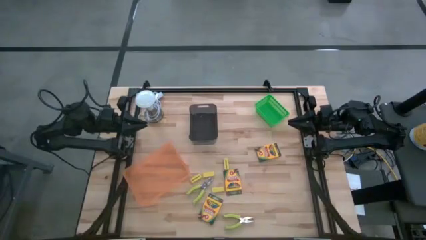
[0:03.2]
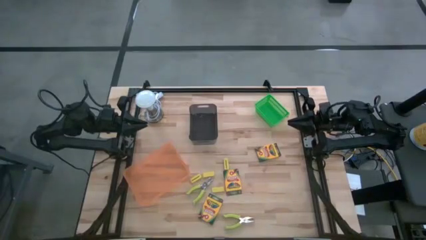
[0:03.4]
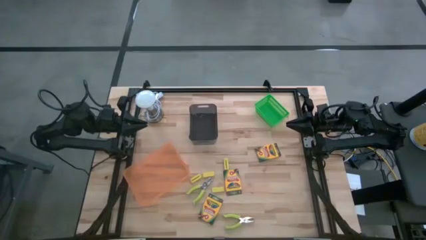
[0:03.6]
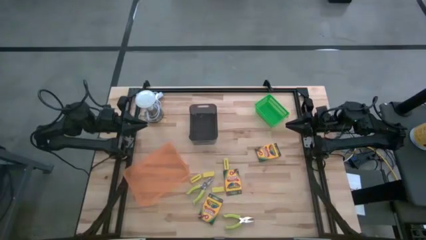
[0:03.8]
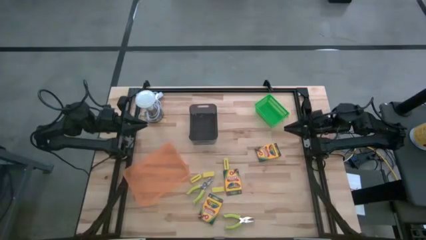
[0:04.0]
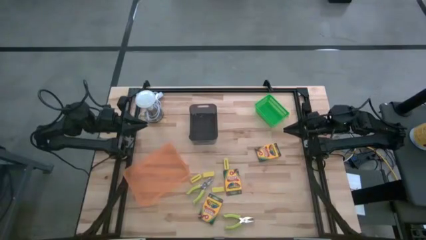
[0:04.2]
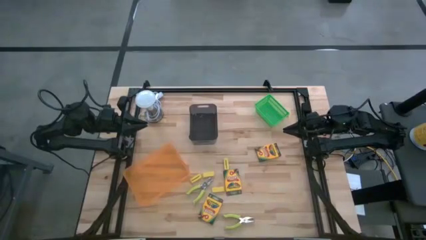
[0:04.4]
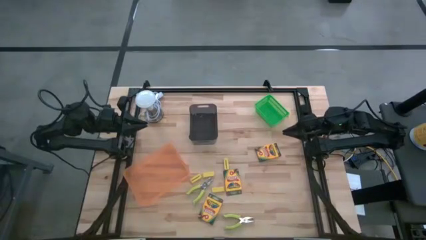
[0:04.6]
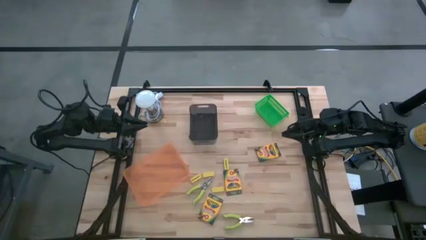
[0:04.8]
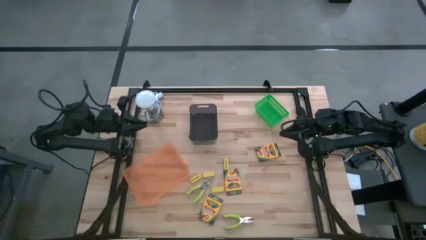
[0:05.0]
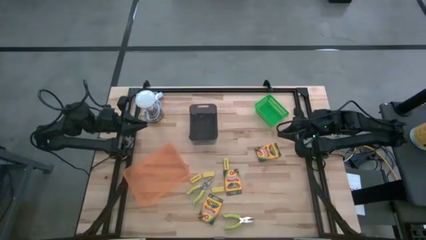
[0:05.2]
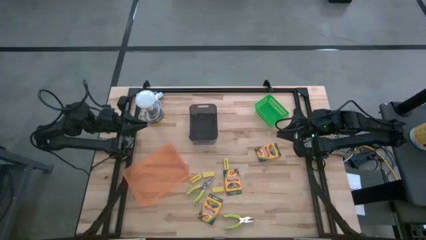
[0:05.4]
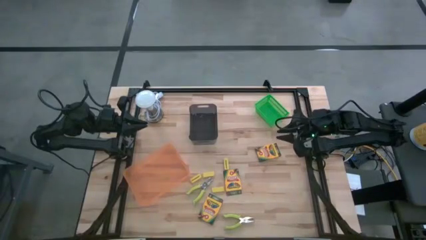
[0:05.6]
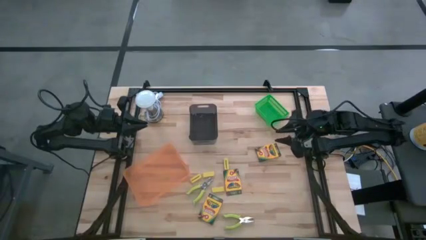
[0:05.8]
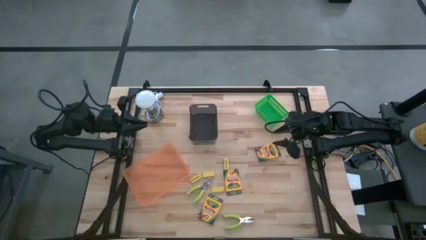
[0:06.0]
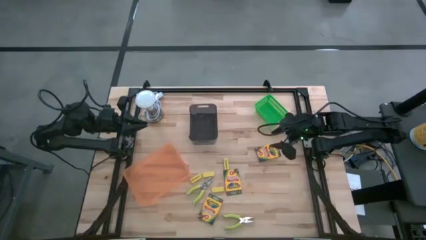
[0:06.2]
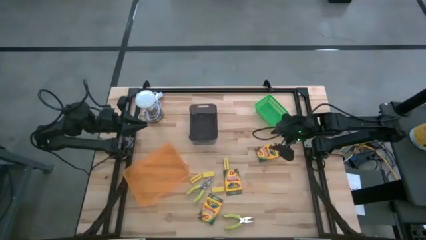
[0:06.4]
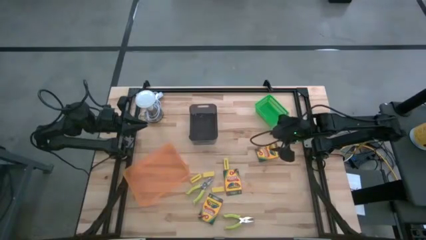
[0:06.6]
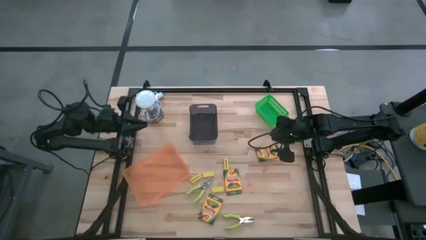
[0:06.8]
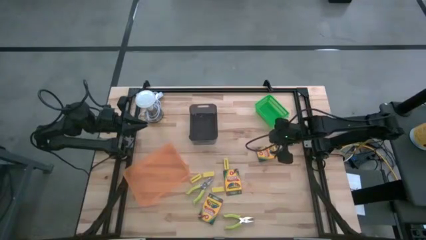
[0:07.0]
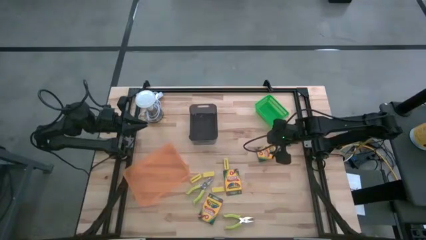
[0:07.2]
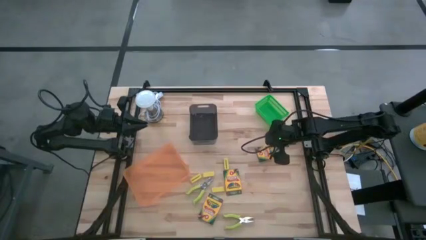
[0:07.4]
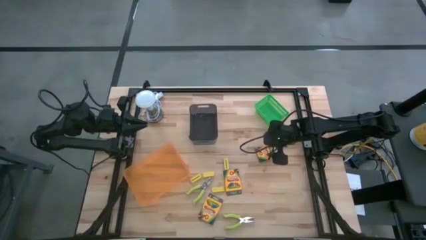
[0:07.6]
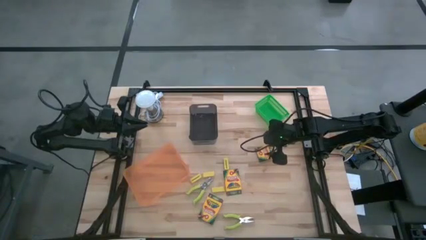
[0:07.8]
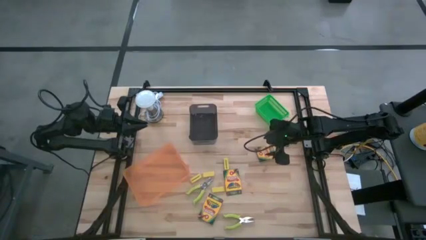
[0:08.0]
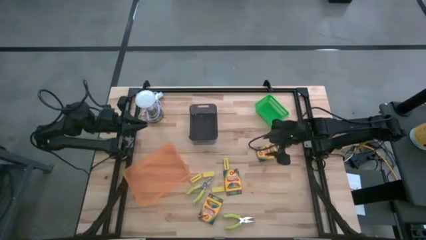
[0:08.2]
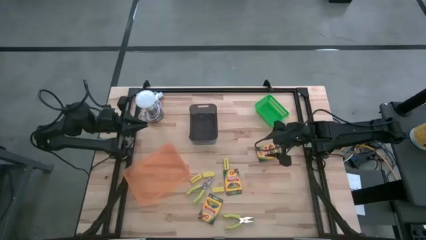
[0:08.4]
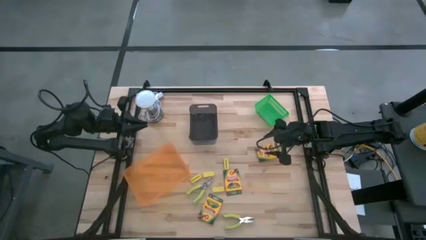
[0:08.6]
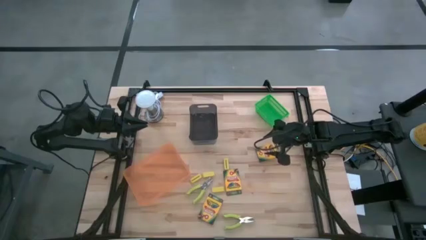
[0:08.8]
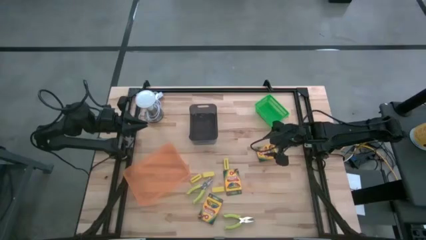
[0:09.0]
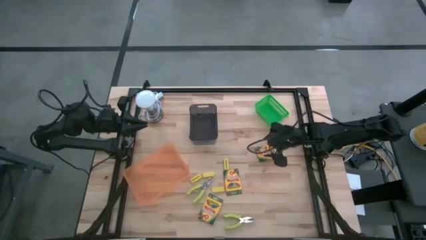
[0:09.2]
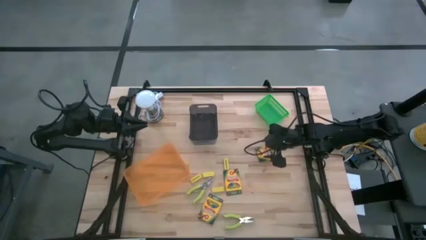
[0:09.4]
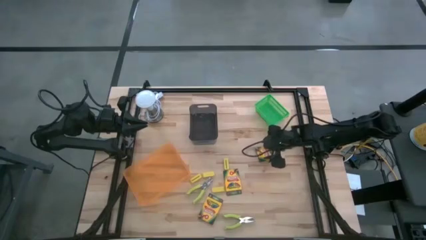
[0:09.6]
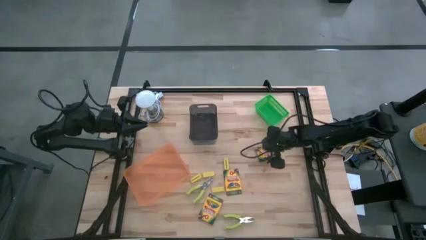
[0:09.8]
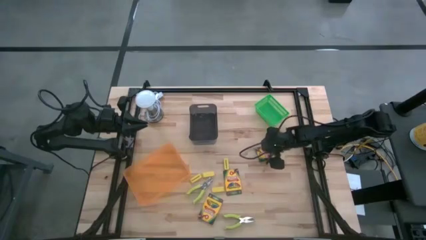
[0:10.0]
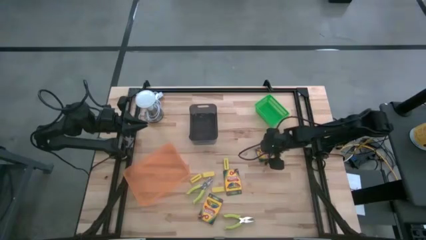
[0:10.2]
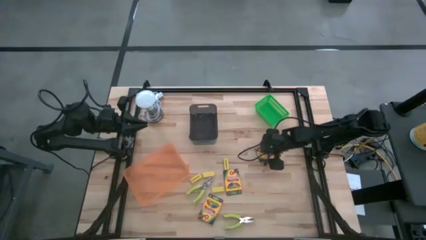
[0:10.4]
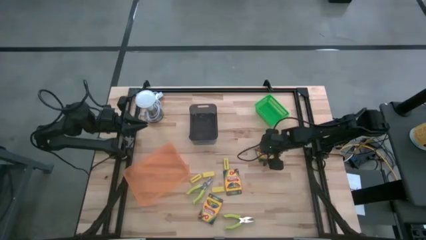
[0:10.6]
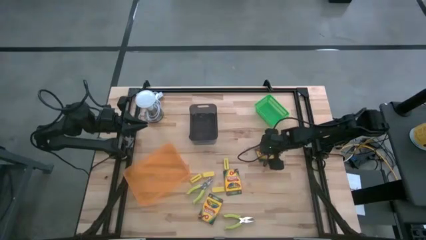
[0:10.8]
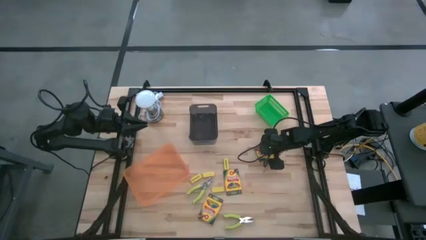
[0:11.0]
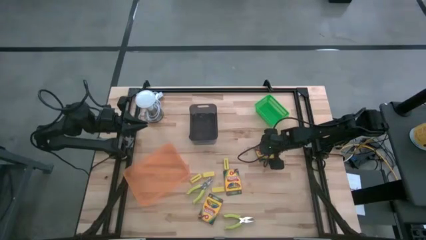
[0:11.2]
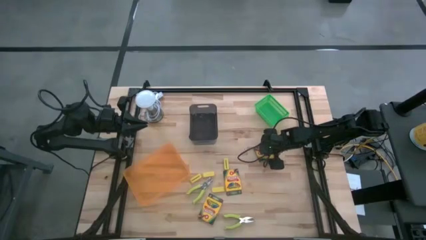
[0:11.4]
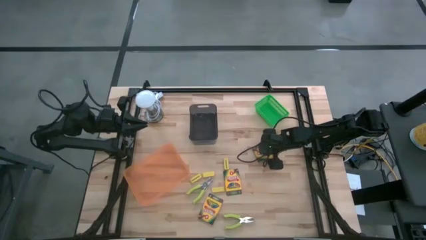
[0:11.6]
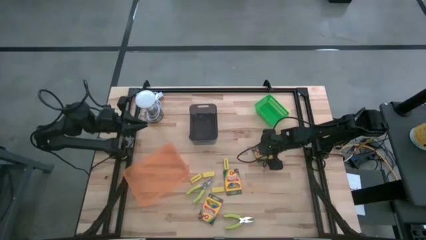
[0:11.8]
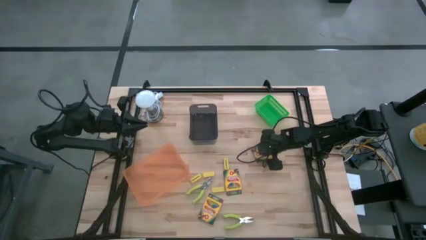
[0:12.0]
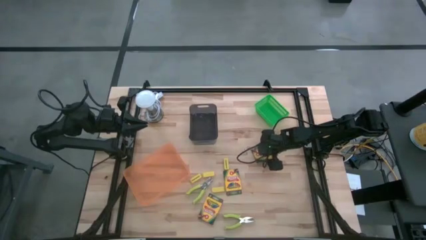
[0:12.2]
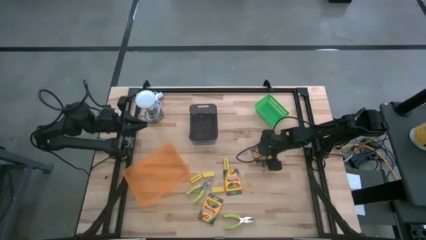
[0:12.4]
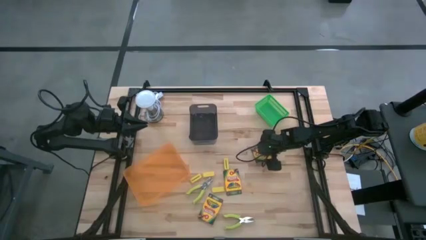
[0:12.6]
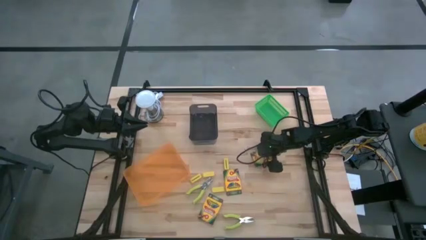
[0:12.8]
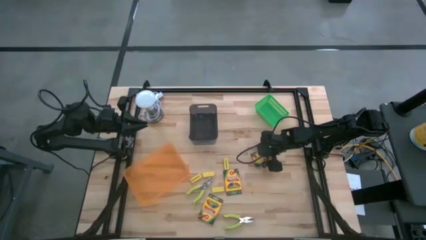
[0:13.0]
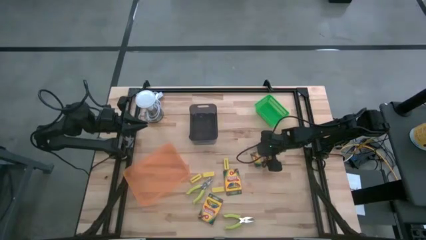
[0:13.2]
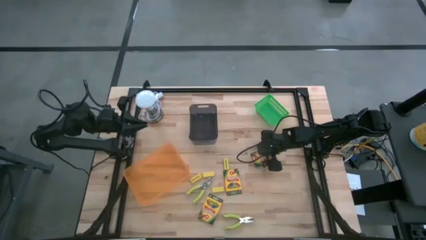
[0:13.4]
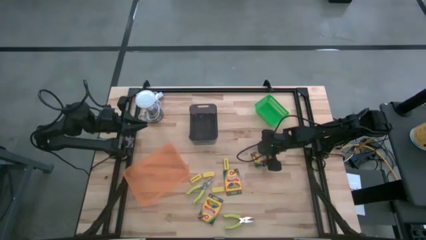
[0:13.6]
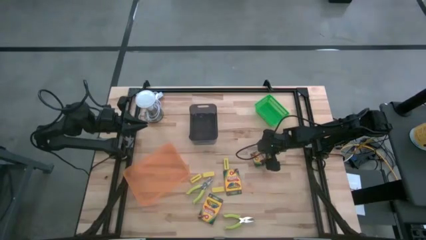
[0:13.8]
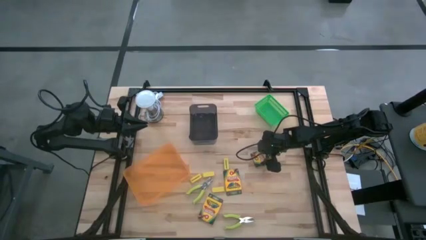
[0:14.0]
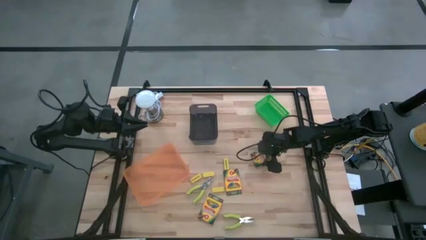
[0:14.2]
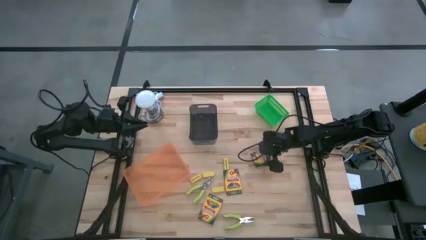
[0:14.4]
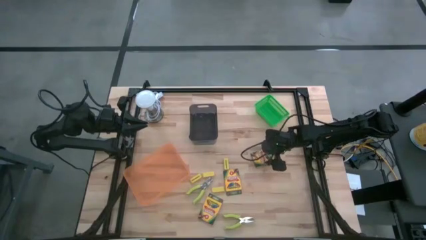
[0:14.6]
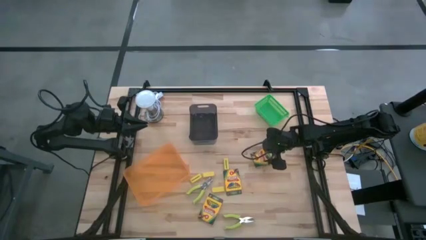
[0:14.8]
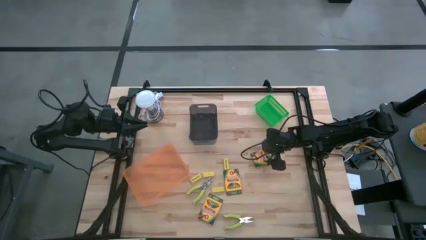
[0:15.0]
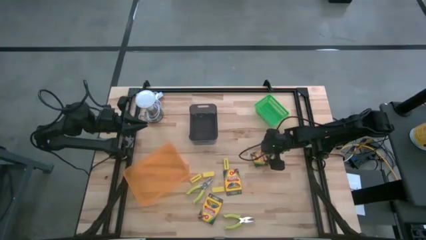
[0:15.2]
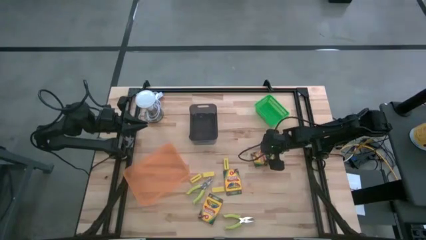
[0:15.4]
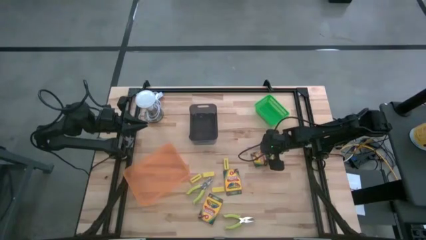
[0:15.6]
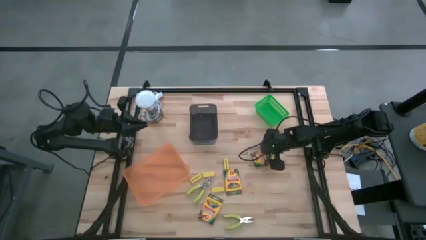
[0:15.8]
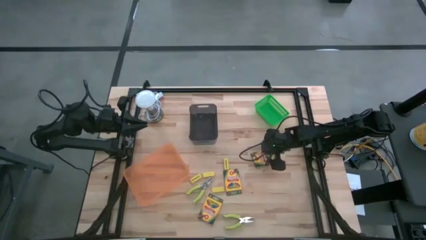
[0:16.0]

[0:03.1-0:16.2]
Task: Pick & Place School Supplies
Put the pack of crayons into the orange bin
